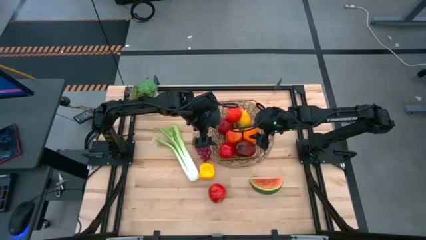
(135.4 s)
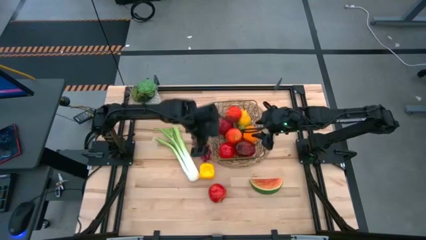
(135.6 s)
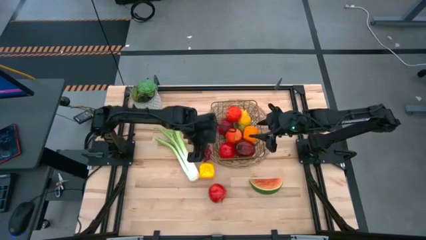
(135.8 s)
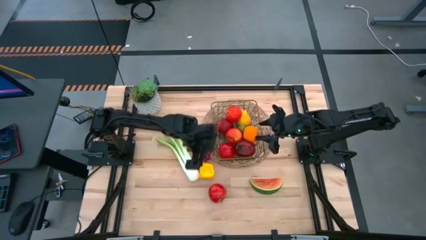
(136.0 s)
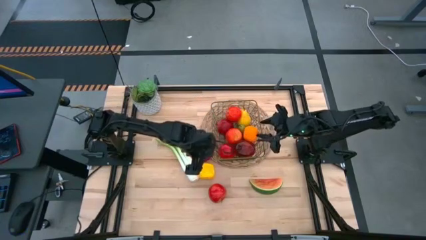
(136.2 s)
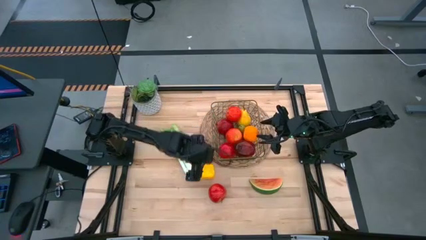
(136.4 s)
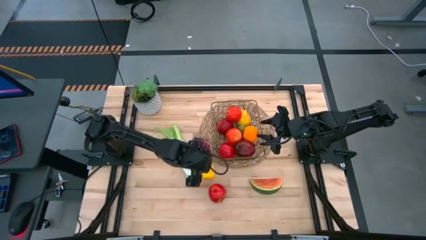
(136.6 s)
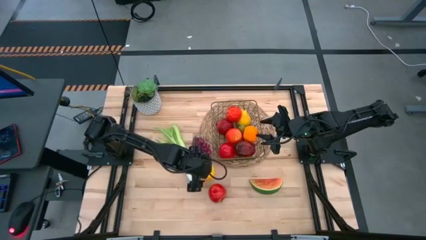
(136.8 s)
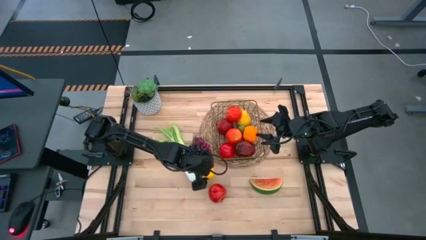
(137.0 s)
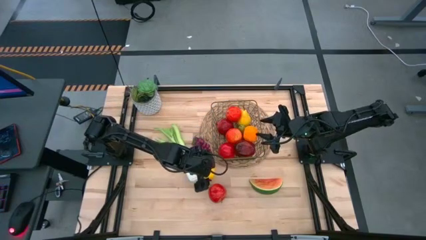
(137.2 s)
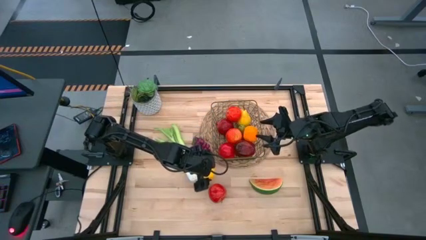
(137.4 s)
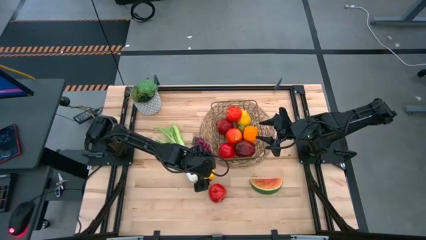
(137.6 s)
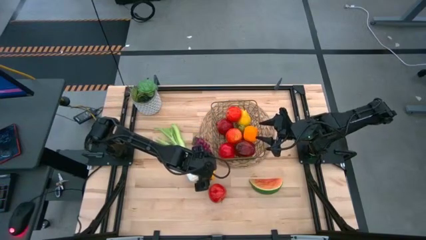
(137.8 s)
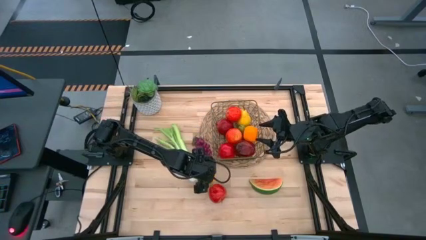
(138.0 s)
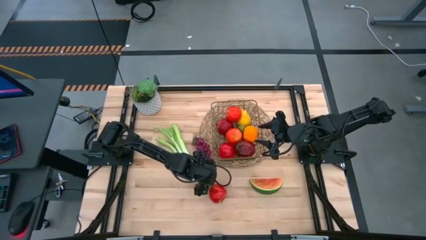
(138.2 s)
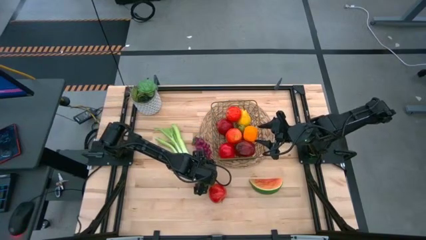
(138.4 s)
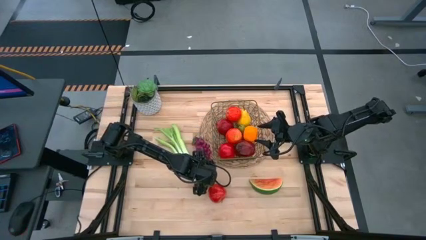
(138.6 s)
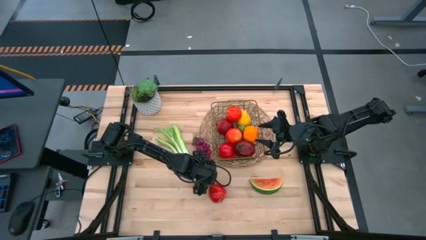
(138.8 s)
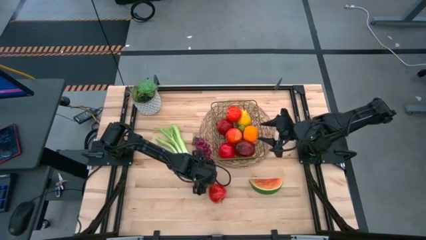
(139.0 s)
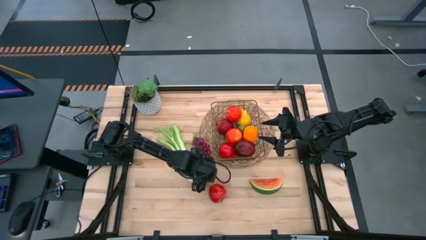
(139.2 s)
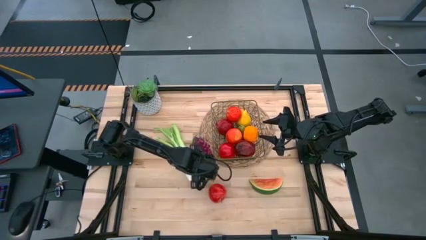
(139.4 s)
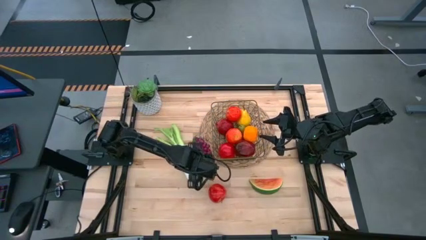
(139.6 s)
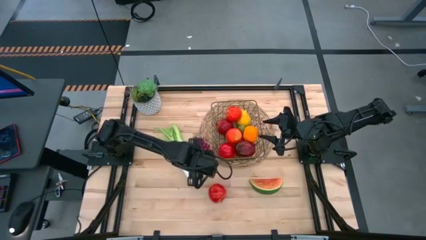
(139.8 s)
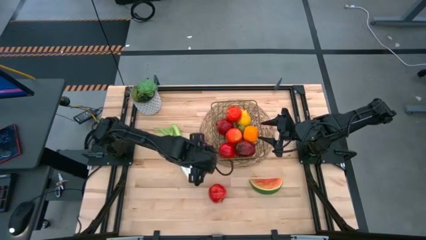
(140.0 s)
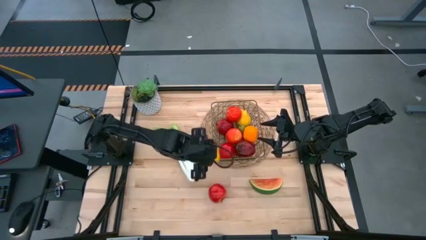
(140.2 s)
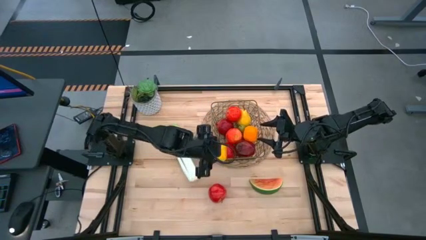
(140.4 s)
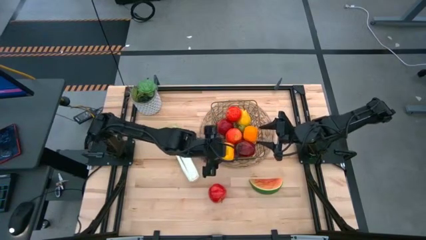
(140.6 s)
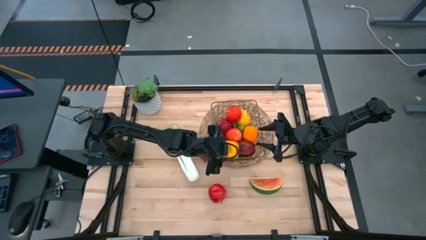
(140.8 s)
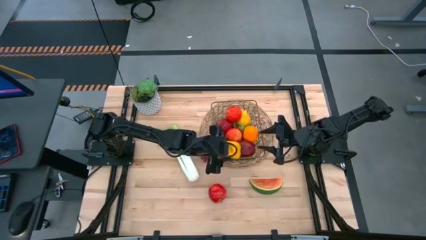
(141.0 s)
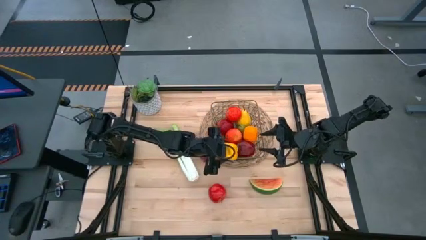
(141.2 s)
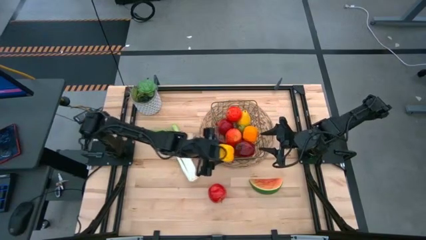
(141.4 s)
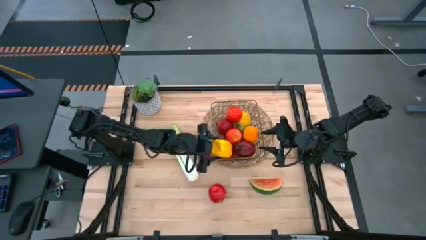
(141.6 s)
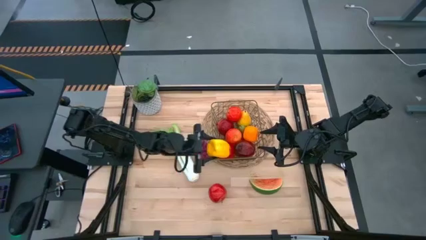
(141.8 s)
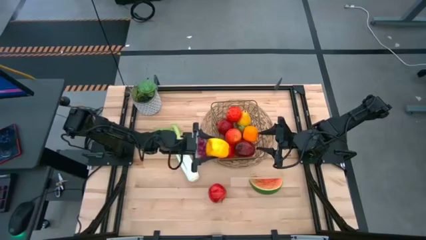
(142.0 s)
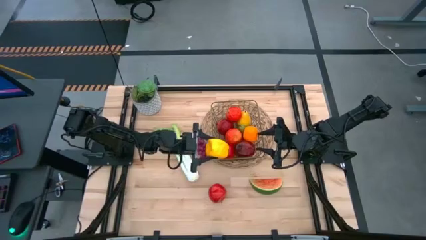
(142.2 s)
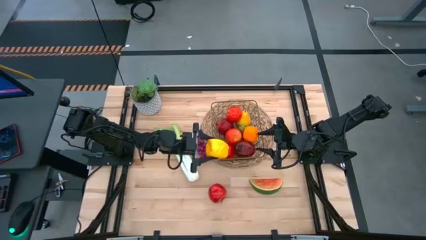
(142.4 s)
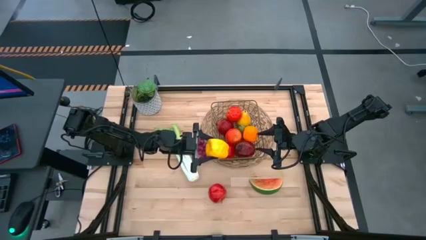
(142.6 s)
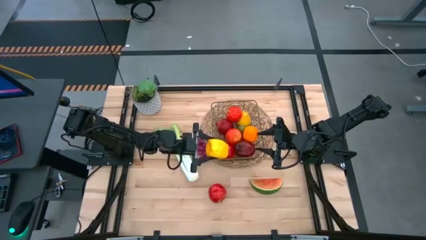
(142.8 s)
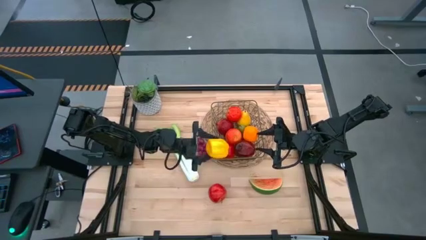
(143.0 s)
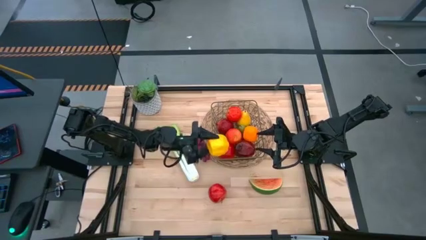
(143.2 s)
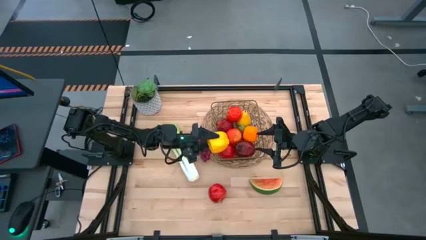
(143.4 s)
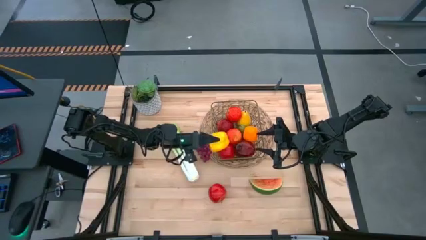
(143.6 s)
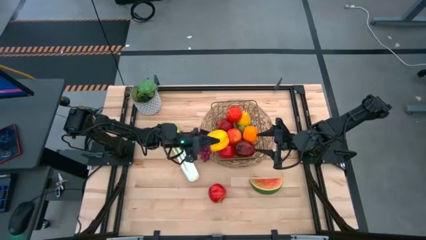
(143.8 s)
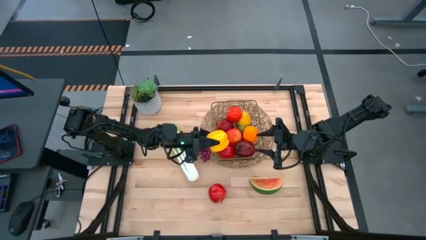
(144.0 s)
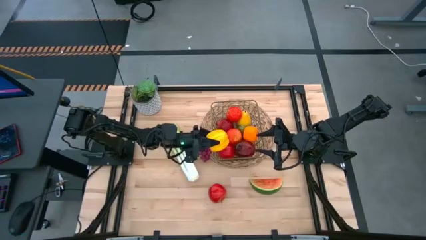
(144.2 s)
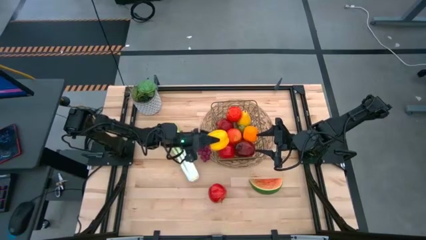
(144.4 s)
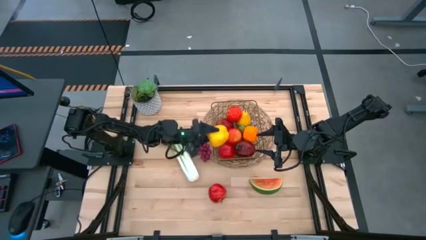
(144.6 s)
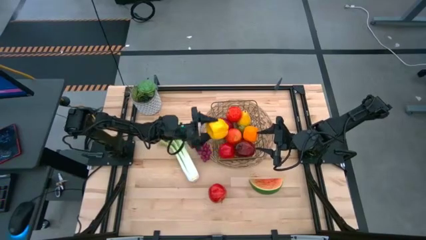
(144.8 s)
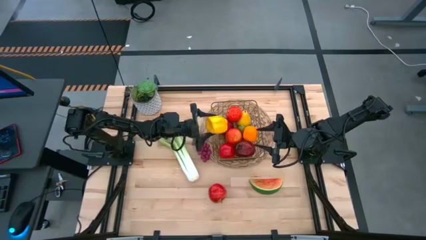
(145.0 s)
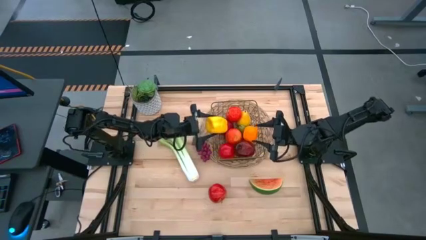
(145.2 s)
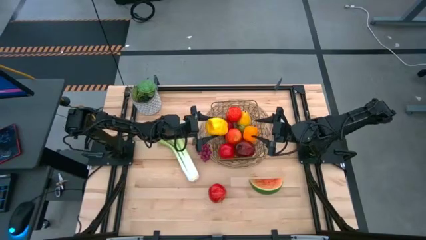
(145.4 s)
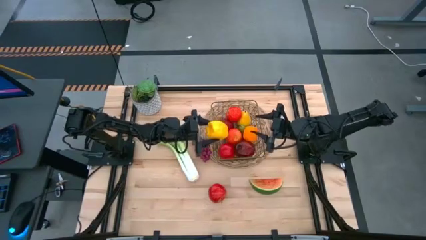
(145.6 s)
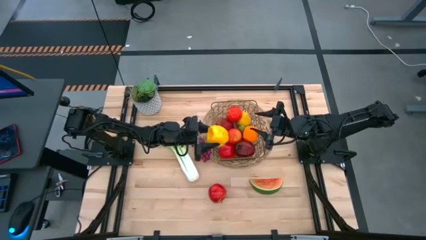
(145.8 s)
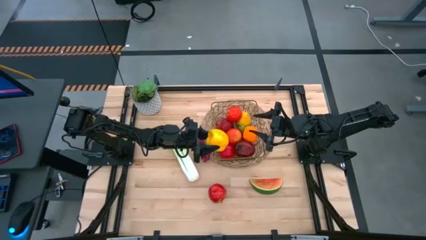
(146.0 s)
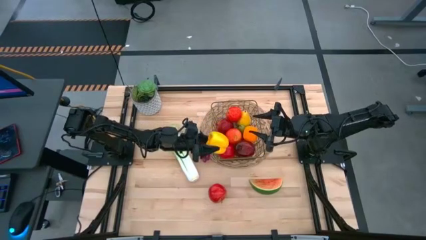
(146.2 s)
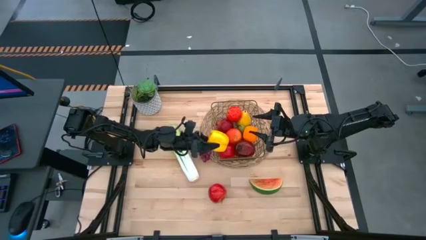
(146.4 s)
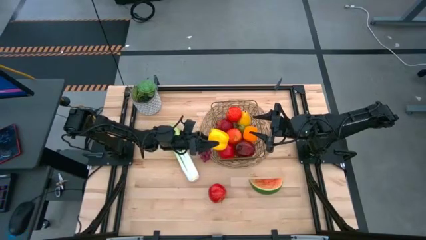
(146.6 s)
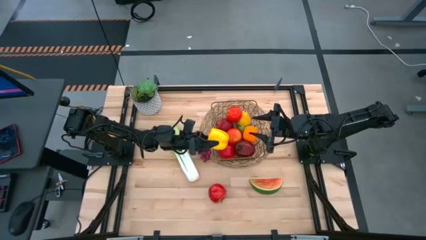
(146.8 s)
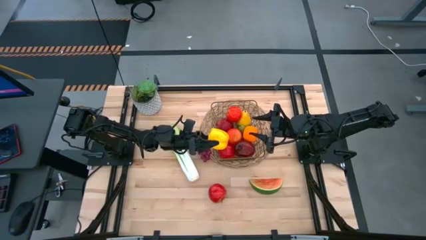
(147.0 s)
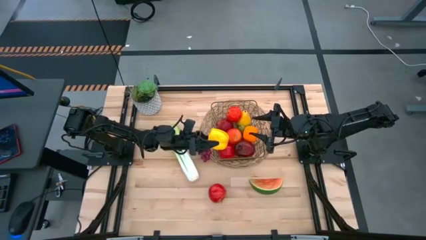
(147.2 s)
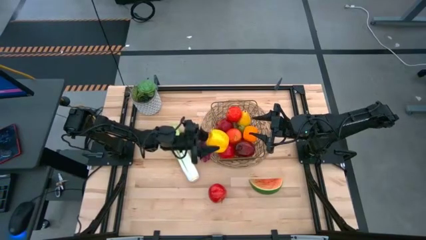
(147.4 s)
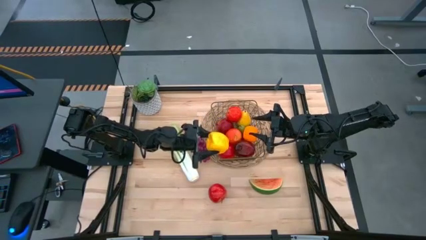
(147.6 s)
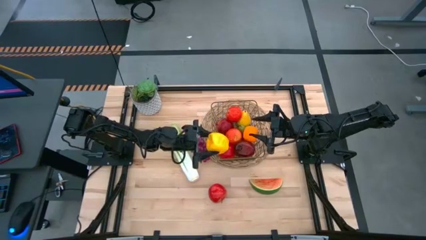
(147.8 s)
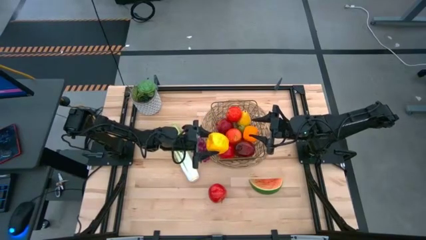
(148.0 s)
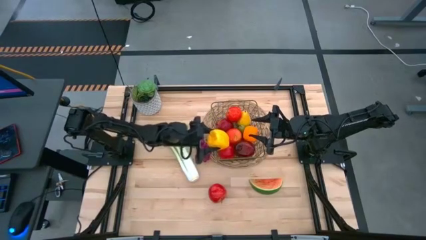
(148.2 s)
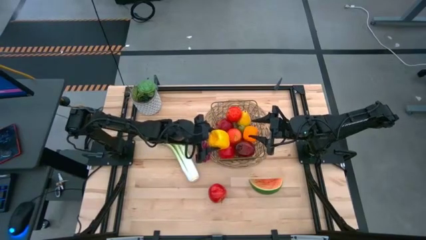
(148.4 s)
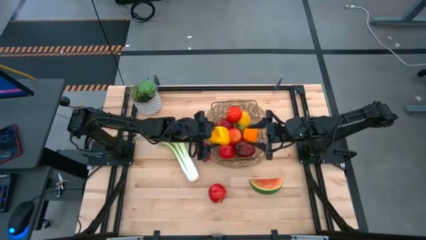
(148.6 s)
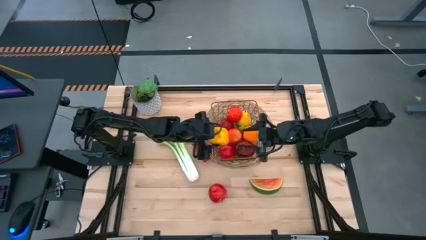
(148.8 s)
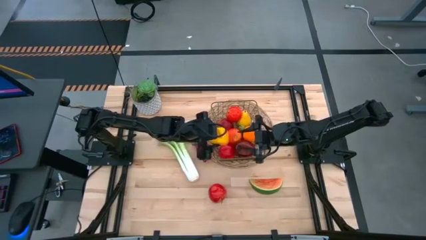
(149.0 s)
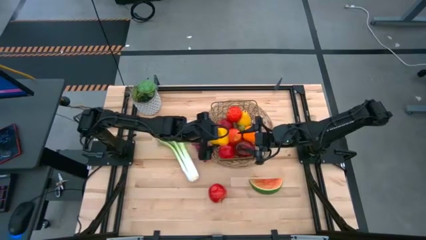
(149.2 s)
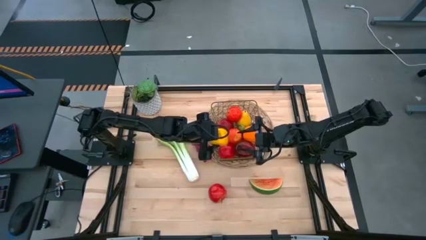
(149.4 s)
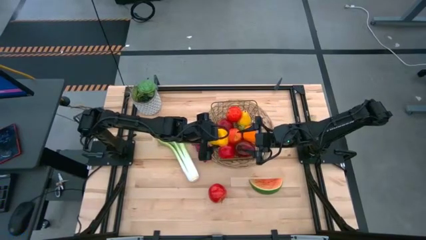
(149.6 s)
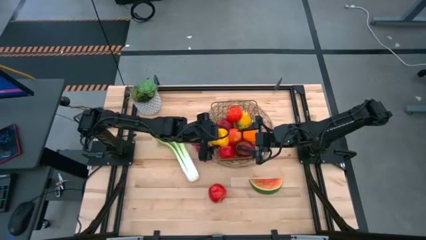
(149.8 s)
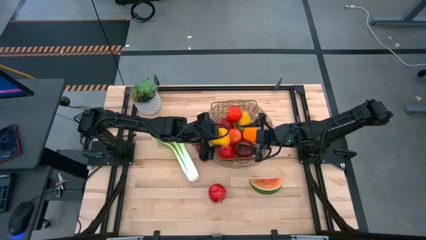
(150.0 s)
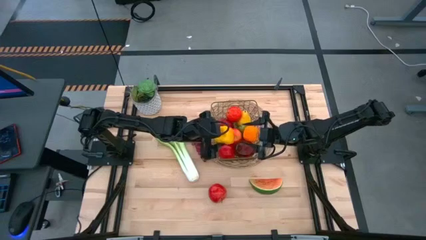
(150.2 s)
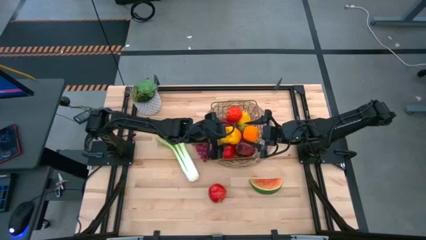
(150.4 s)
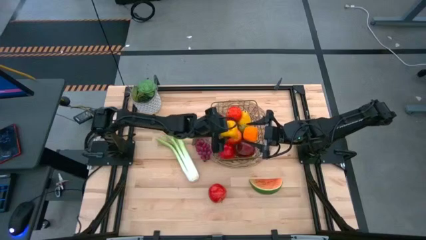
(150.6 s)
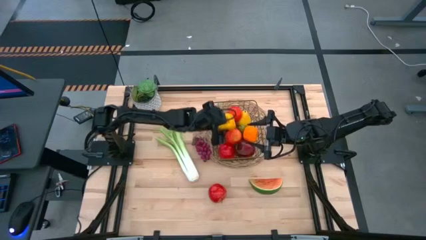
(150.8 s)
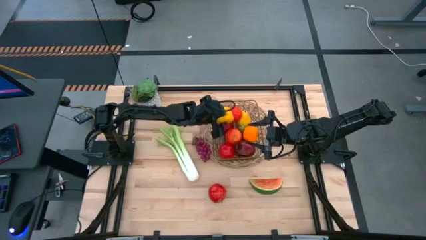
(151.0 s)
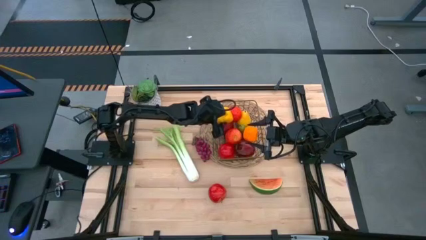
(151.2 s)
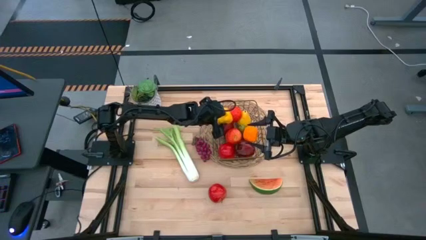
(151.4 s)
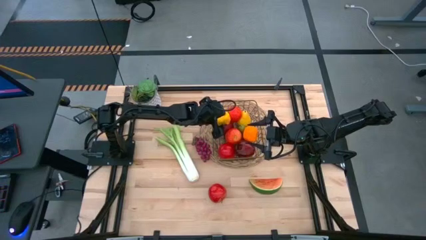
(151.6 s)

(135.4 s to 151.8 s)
Task: Build produce basket
Put the bell pepper into the wire basket

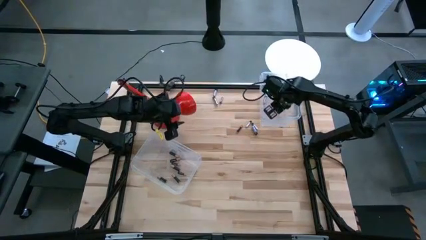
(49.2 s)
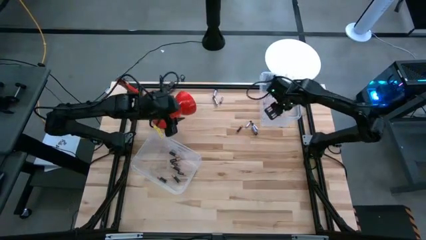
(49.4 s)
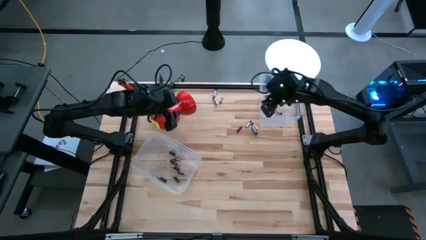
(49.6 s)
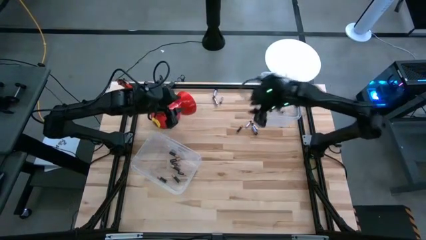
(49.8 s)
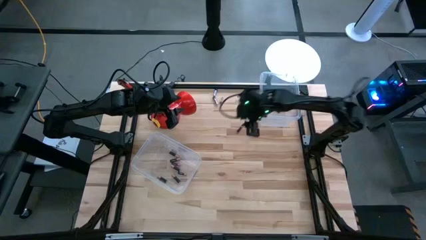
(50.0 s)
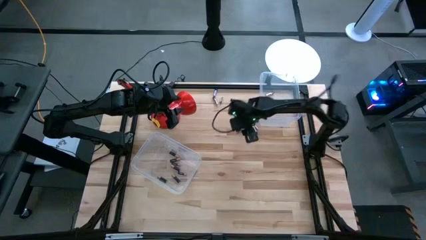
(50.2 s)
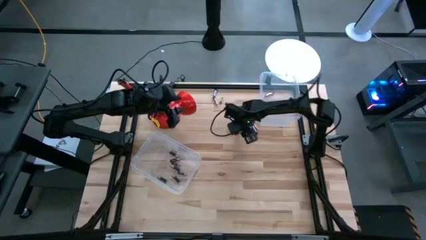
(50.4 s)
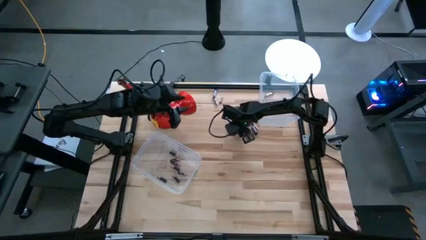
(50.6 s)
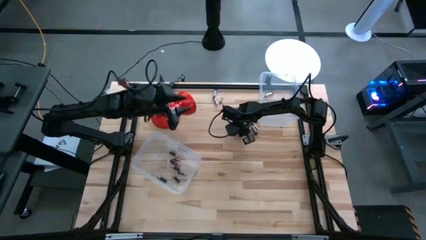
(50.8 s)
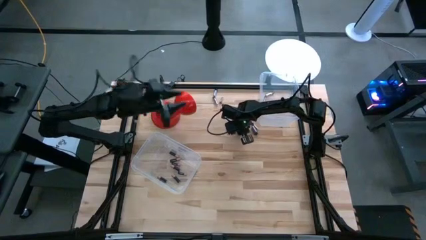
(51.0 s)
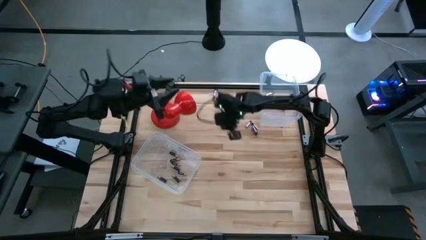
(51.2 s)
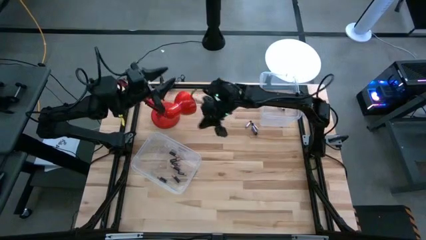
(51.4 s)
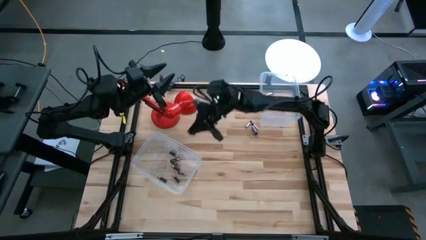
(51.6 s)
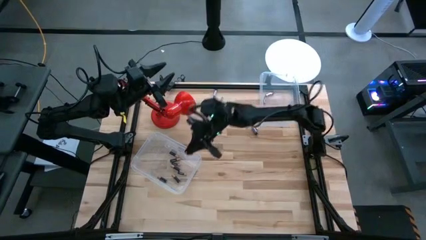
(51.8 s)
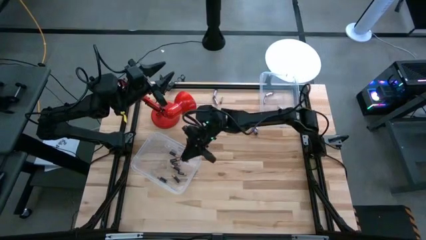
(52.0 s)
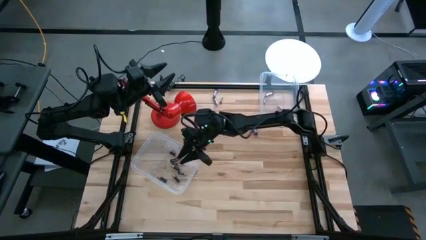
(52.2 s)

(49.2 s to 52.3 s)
Task: Sort batteries
Put the black battery into the bottom transparent bin
